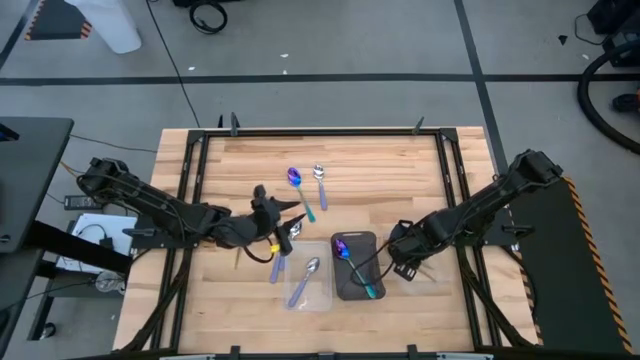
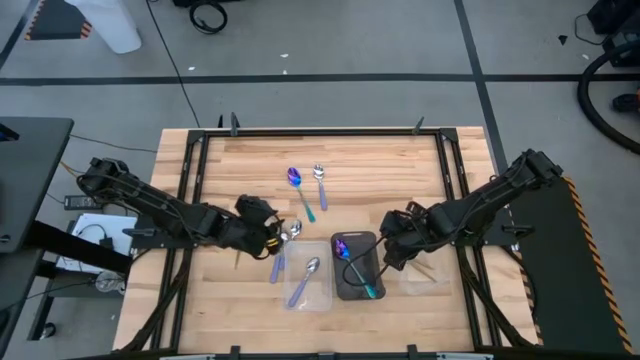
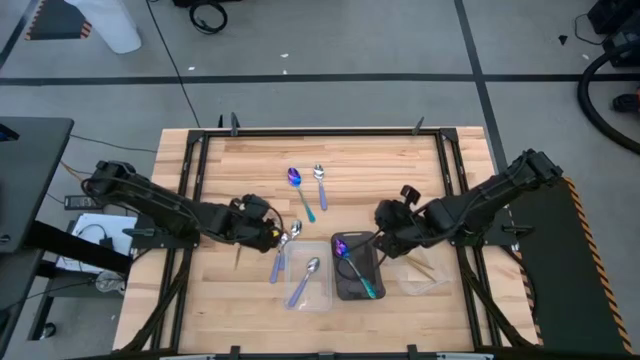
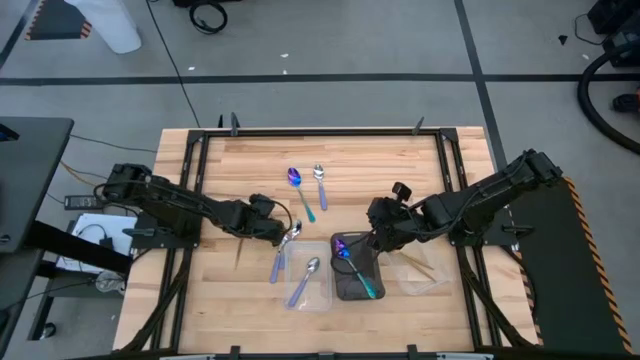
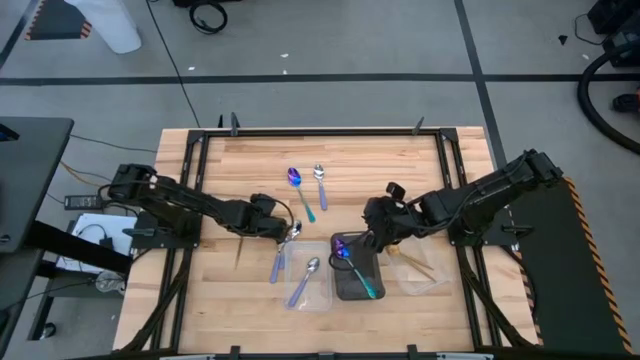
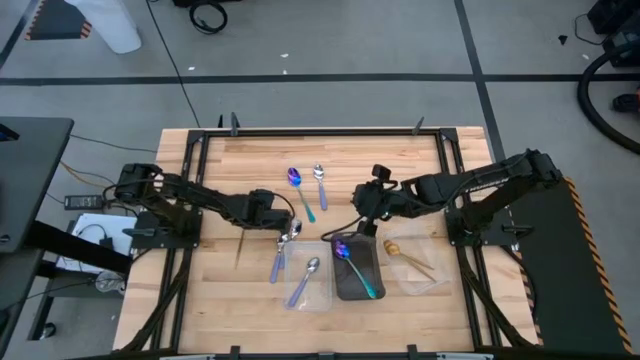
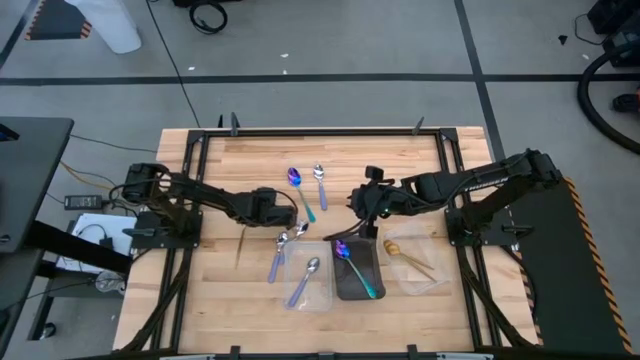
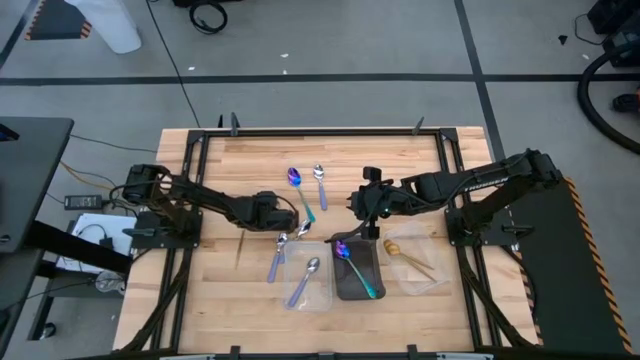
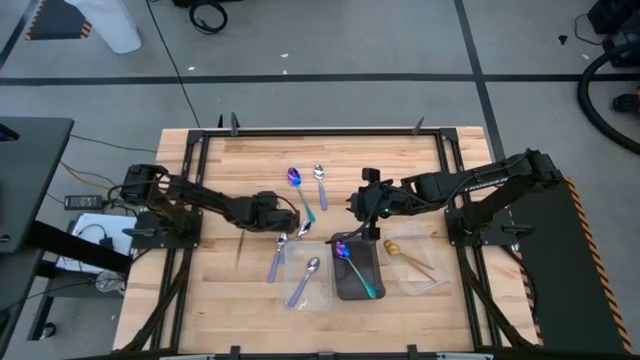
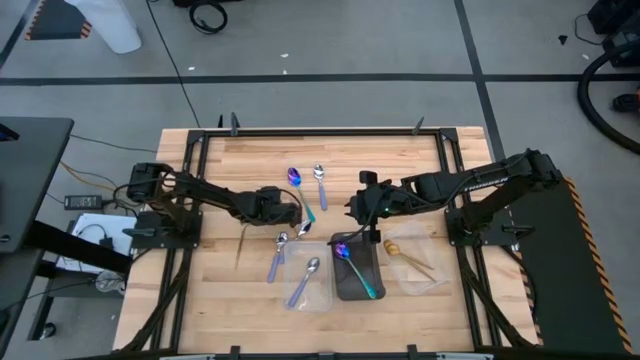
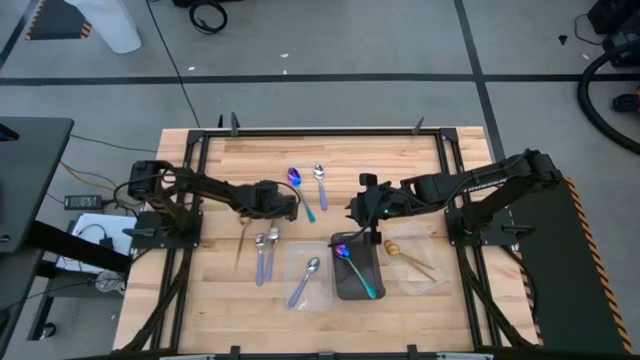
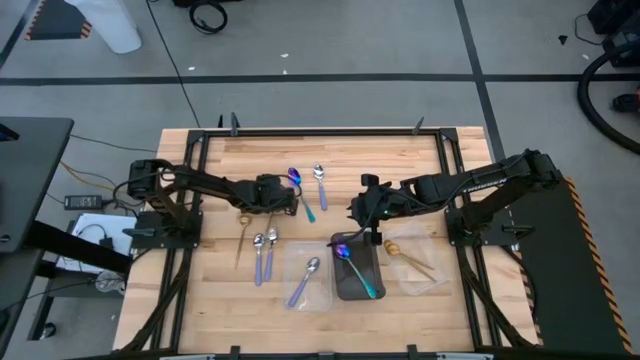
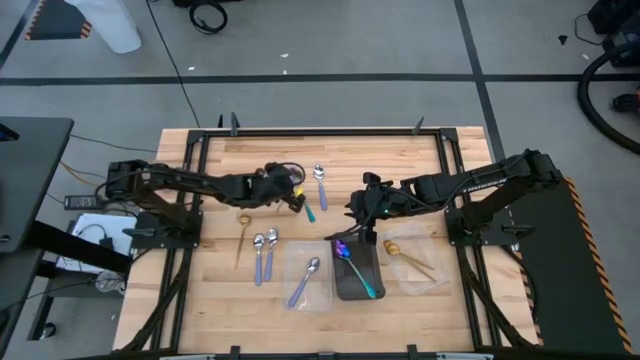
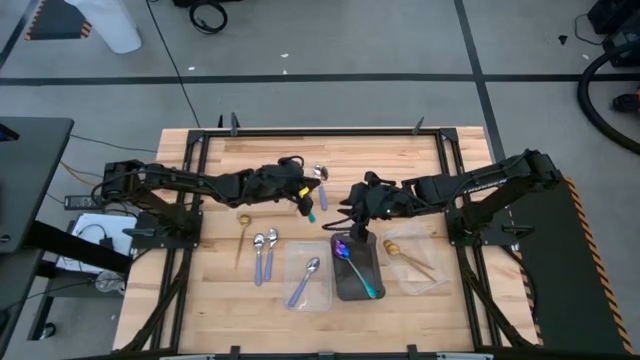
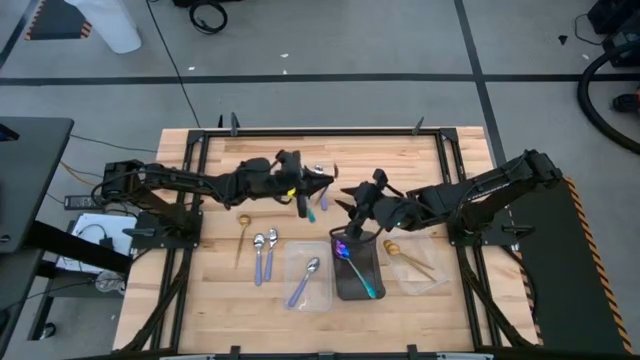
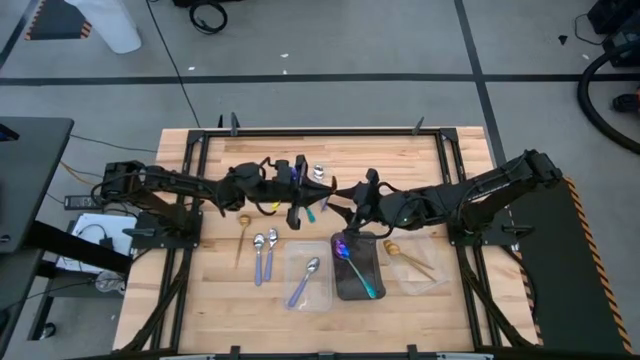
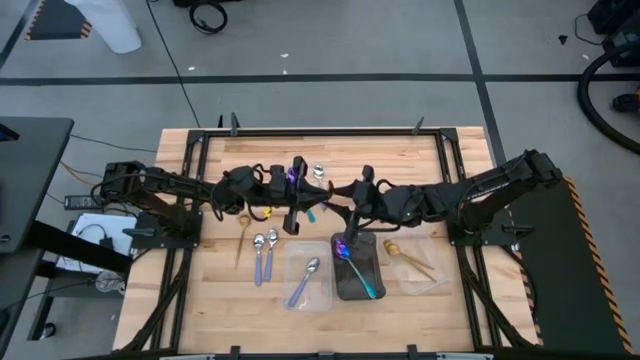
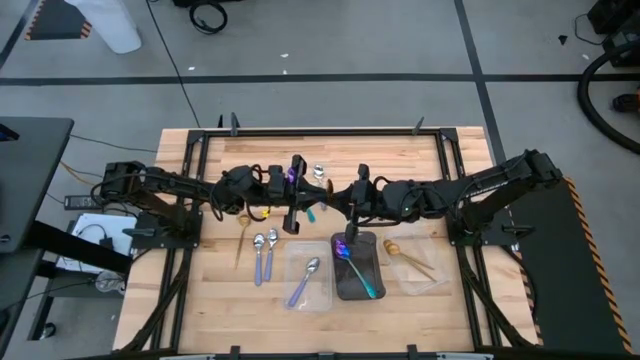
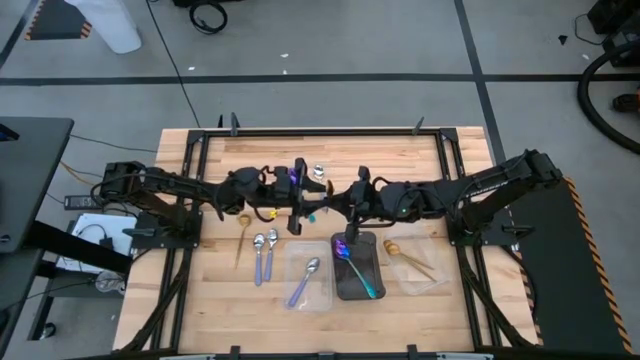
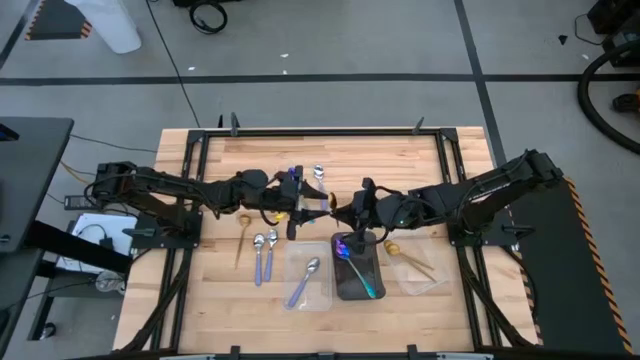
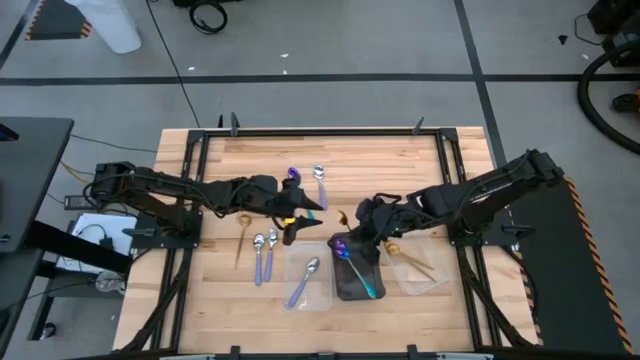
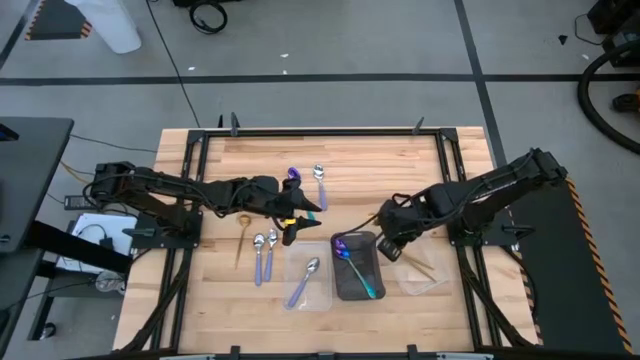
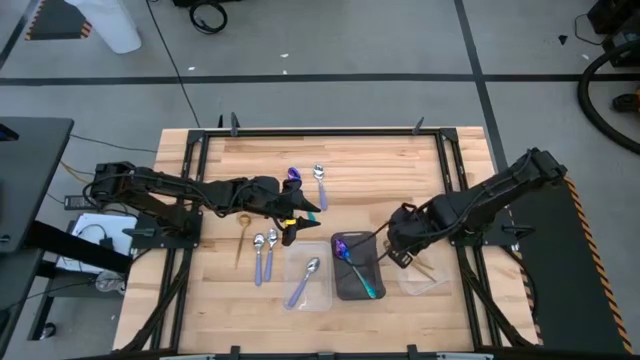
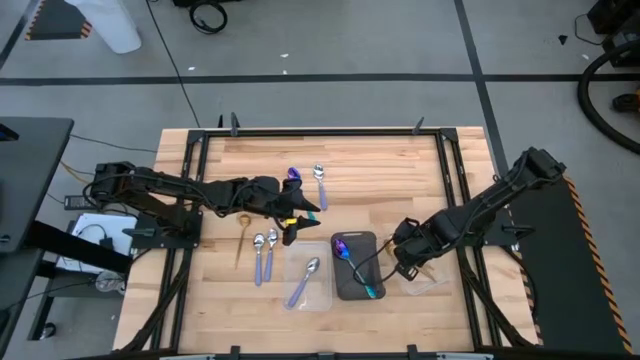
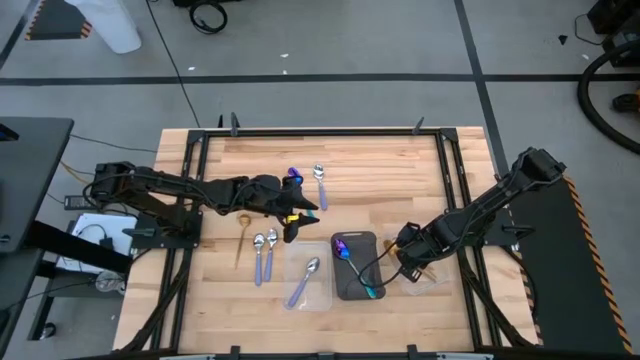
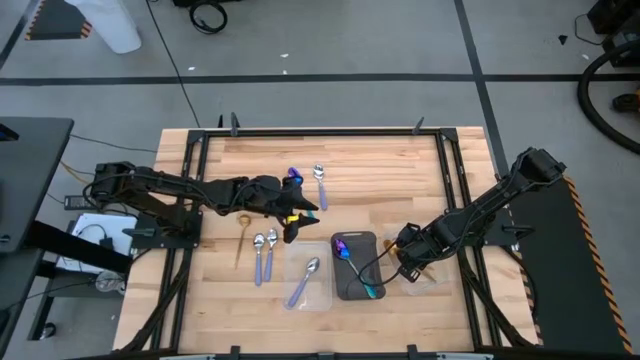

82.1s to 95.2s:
Task: Sort silverware by color (type)
Put the gold spoon into the right transparent bin

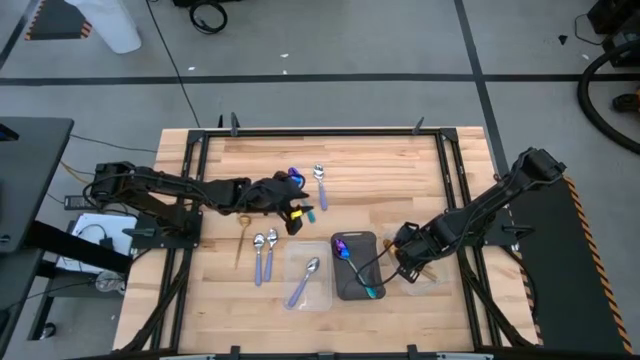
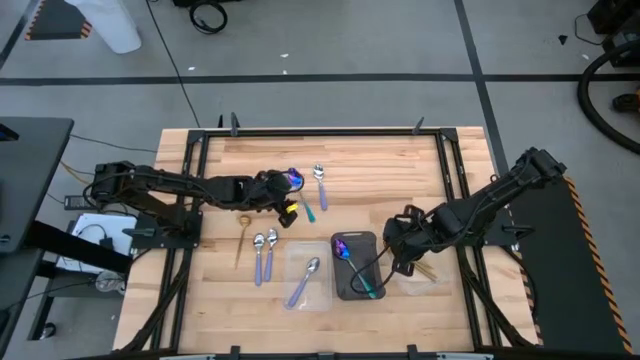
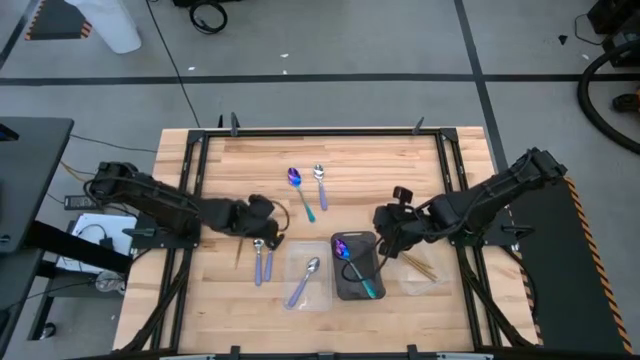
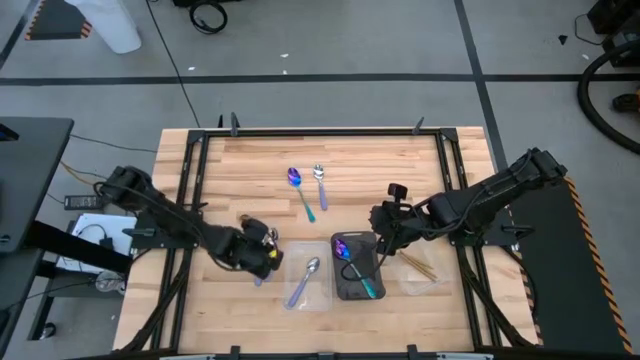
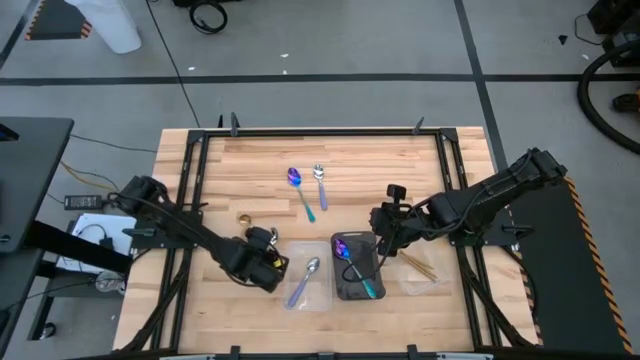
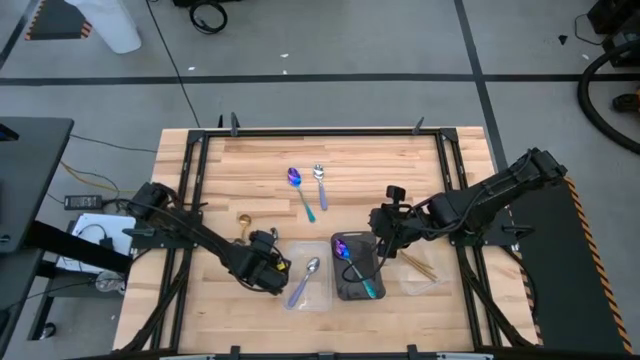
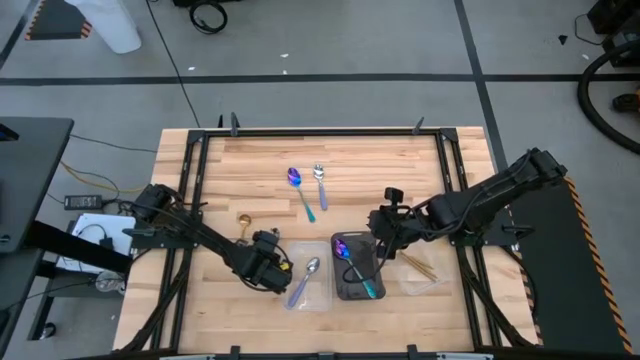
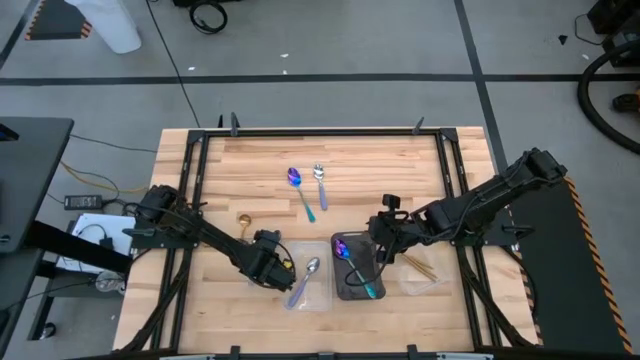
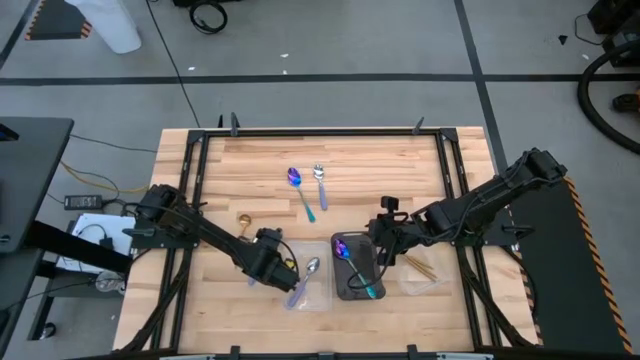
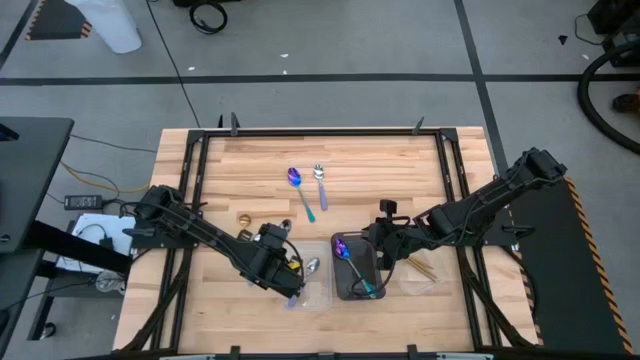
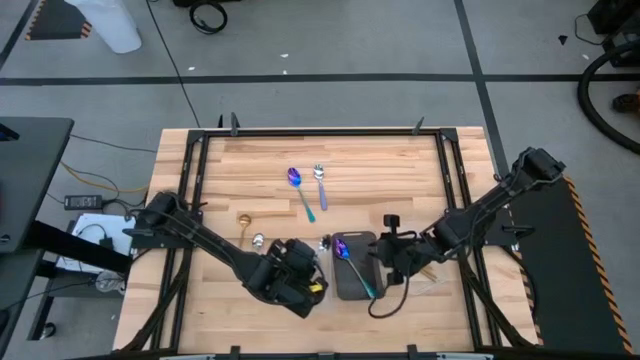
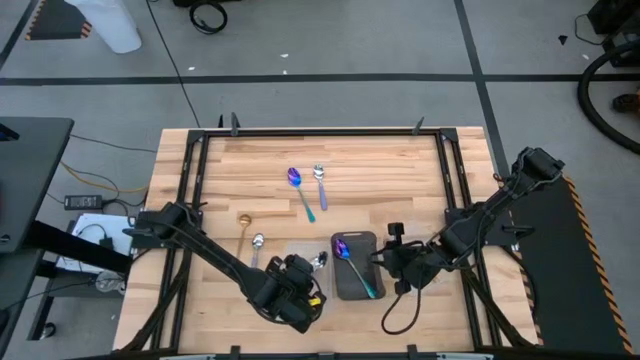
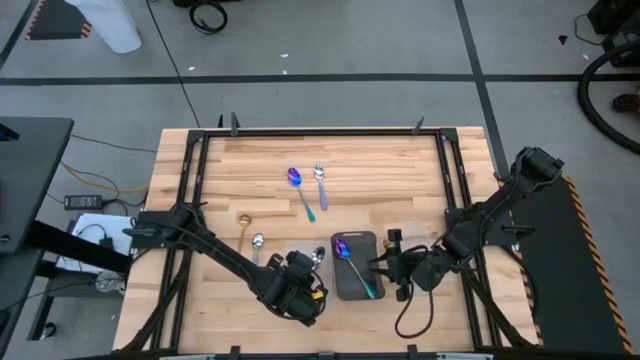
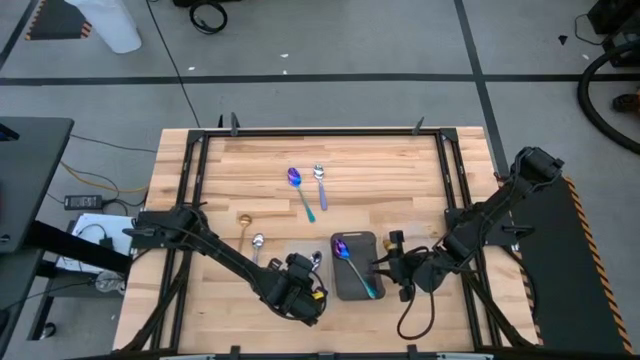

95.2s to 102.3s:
Put the purple spoon into the left transparent bin

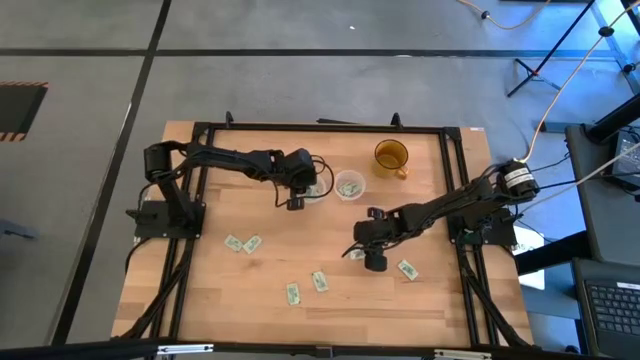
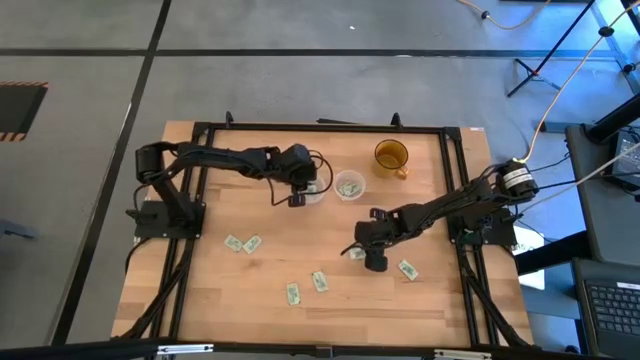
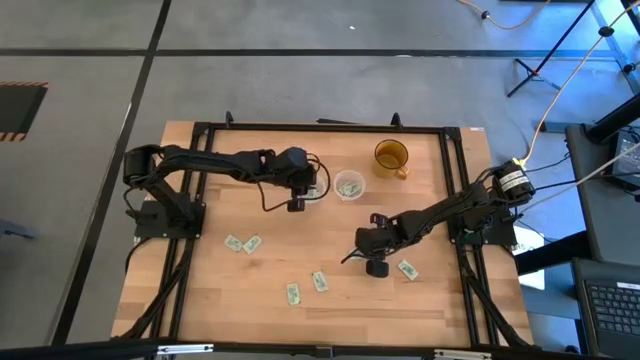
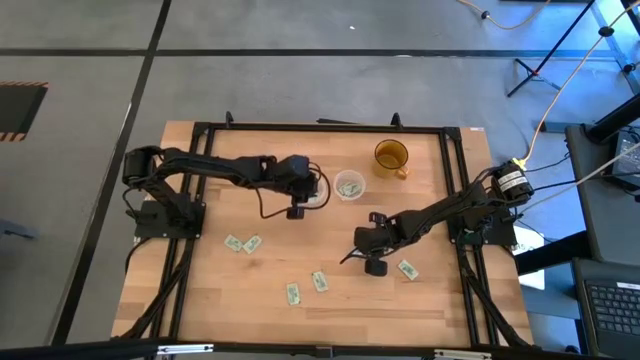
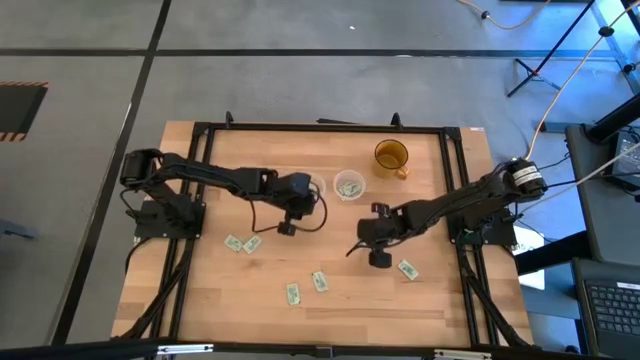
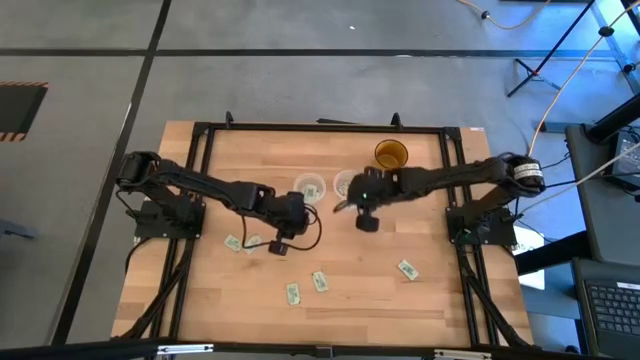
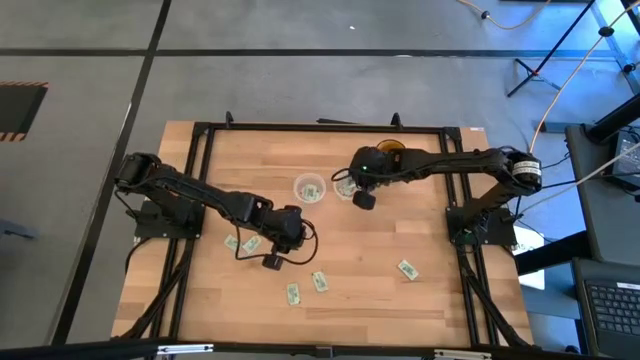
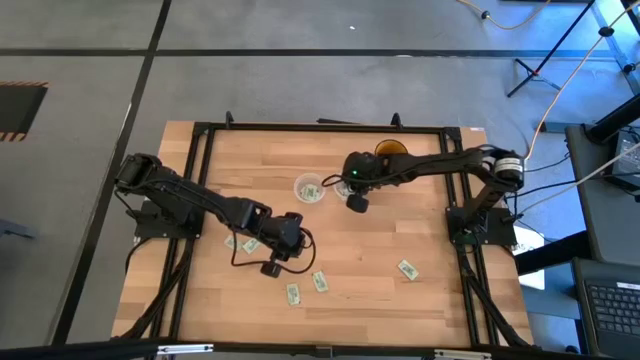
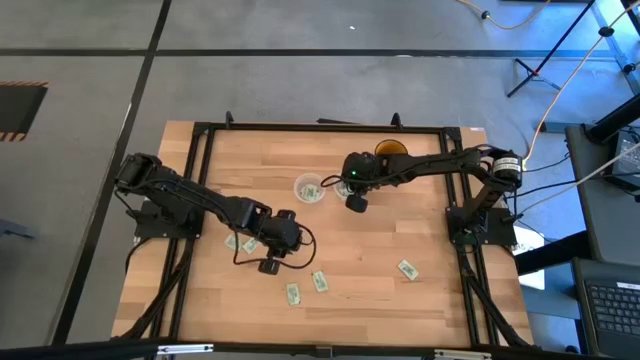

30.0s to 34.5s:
Task: Pick and place Stevia / Truvia into bins
Put the stevia packet into the right transparent container
